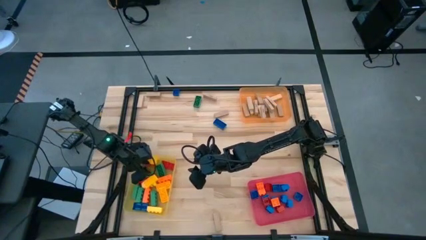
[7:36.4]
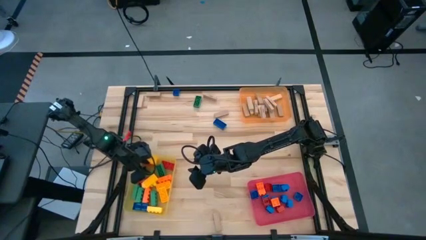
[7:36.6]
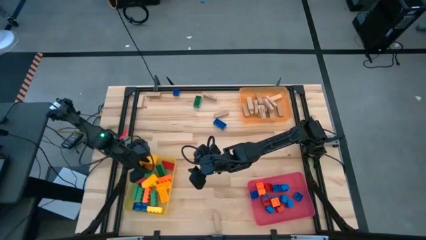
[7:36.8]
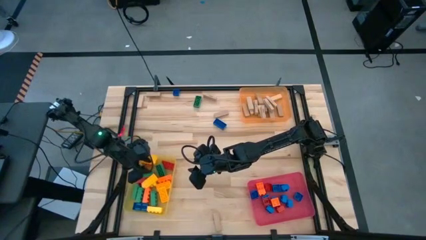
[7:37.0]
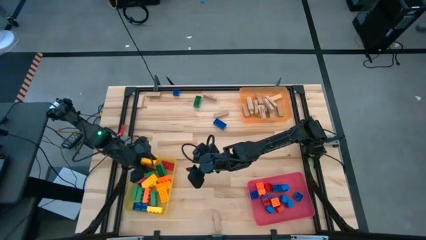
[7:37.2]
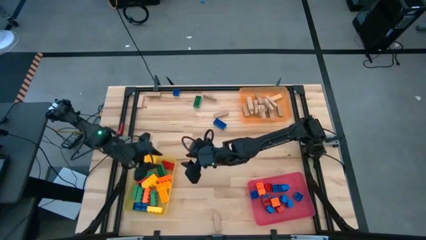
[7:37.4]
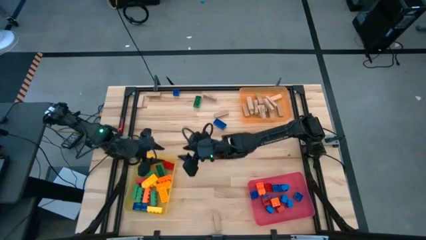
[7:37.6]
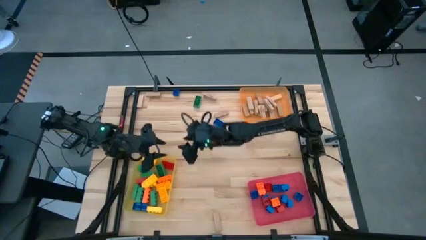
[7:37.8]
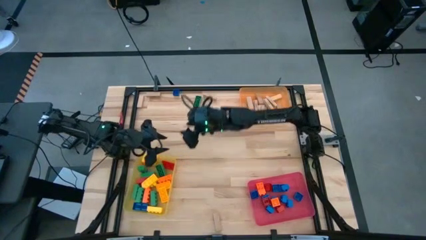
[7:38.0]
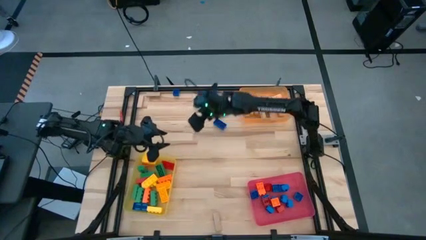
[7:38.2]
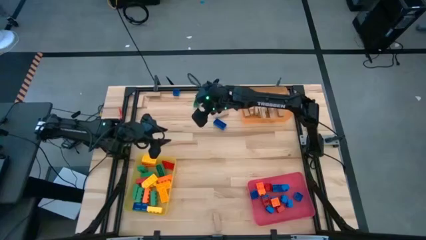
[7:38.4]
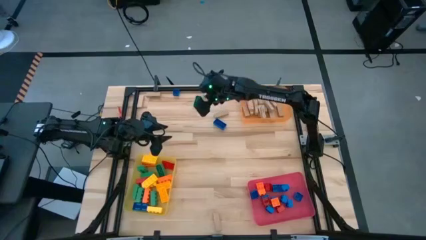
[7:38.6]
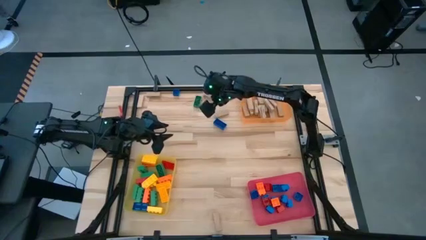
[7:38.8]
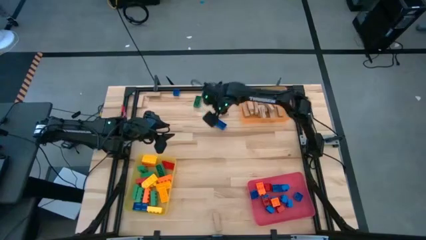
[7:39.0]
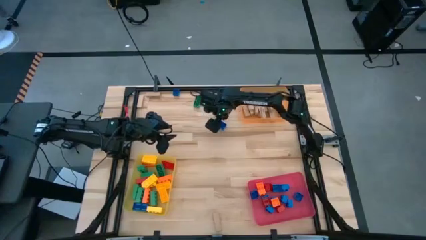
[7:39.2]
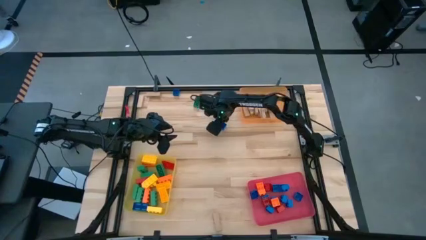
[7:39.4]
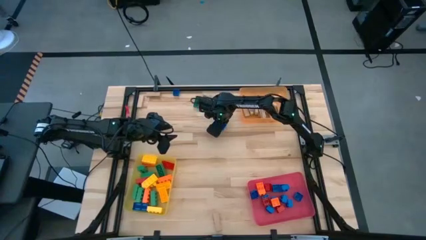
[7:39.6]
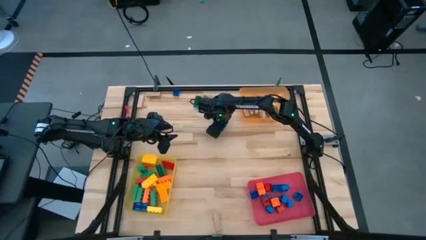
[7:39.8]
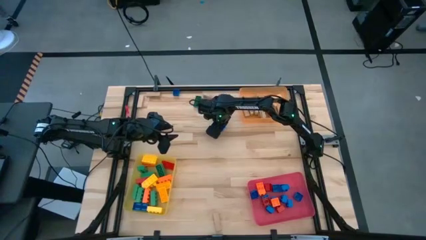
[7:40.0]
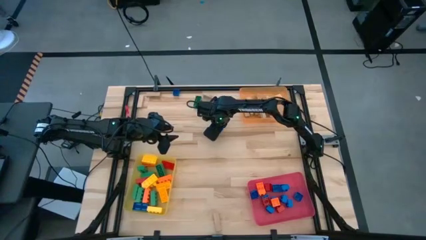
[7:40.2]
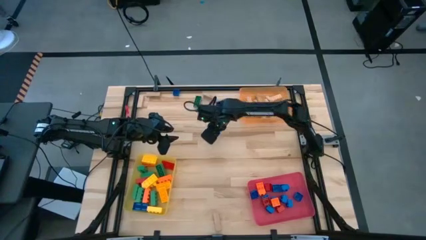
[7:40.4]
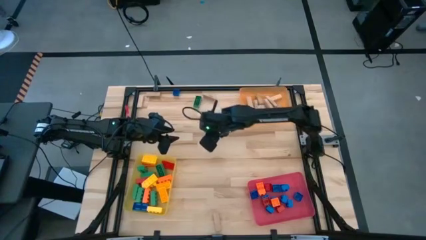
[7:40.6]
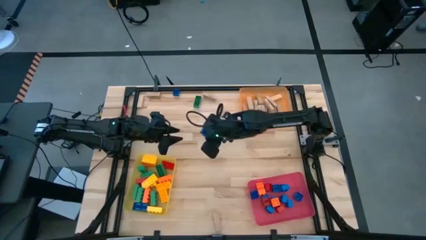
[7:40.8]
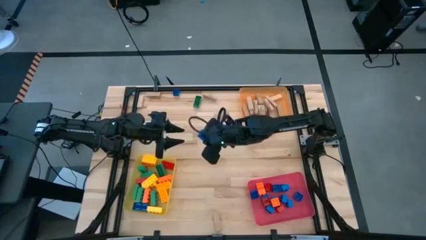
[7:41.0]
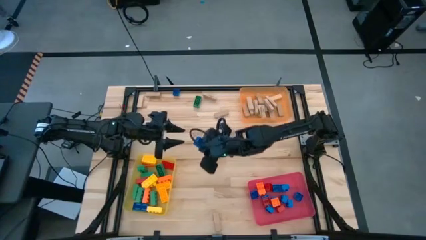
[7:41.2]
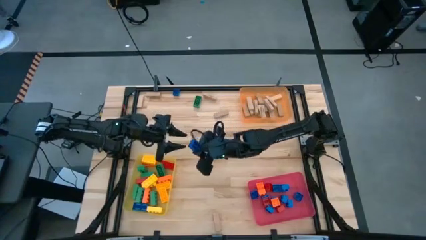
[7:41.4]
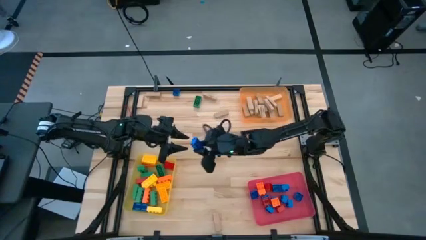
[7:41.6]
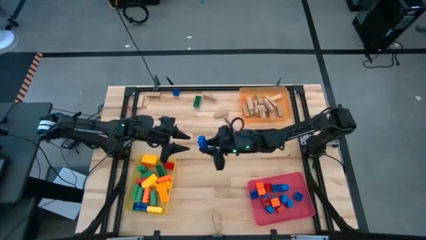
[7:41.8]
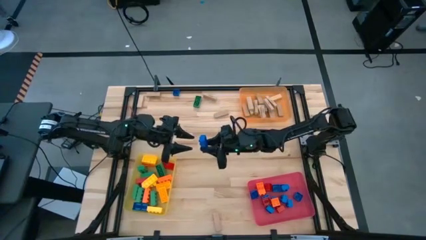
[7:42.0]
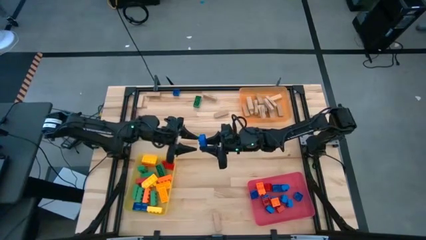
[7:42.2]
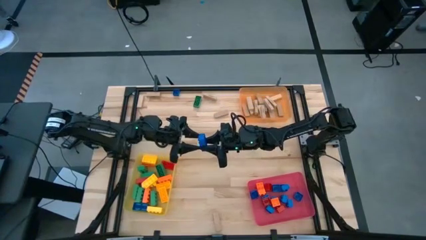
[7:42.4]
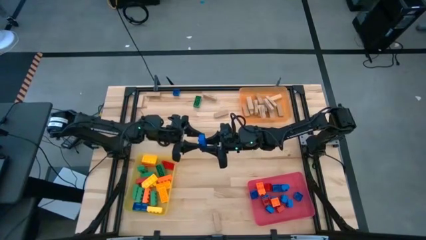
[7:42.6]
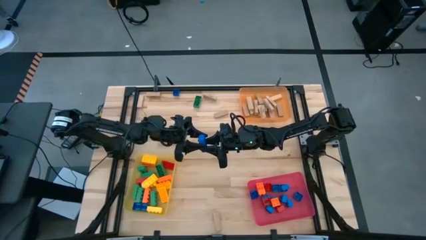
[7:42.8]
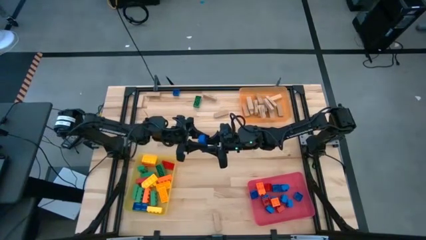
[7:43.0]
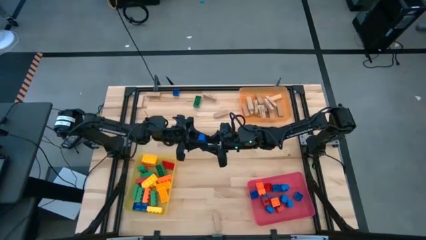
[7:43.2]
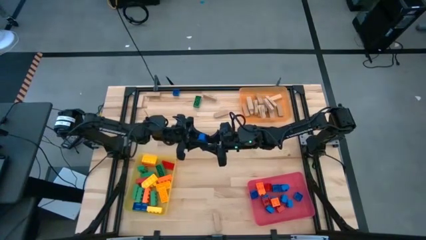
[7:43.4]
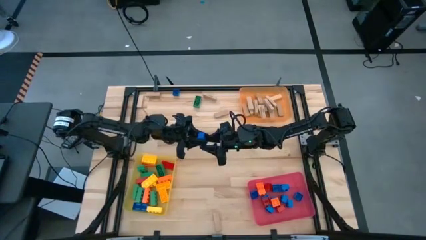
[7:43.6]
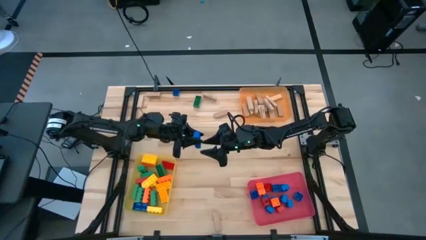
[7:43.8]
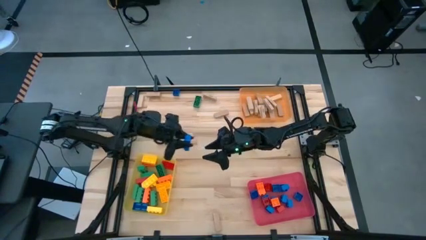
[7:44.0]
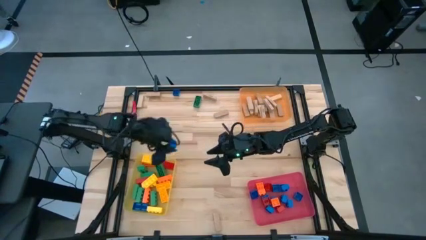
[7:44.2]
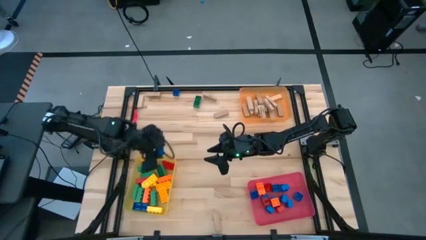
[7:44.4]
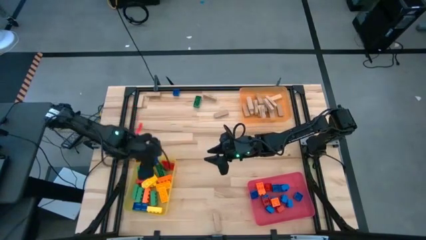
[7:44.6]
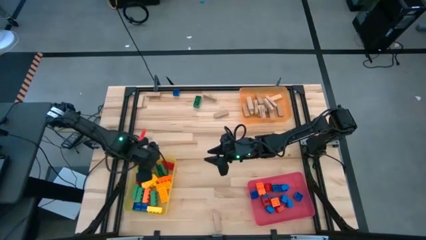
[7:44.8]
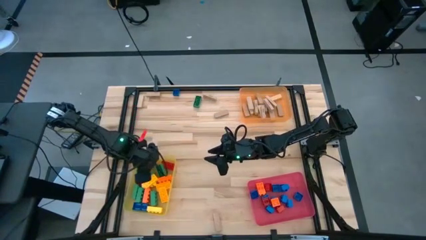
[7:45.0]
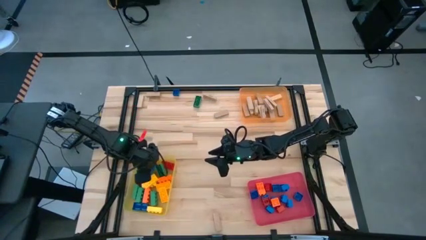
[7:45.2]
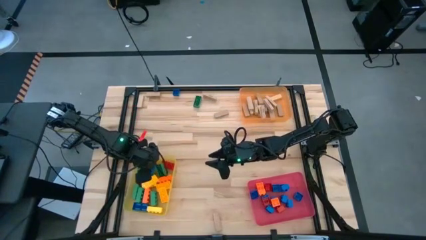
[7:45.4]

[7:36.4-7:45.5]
Task: Sort blocks by size
Put the large blue game piece into the yellow bin

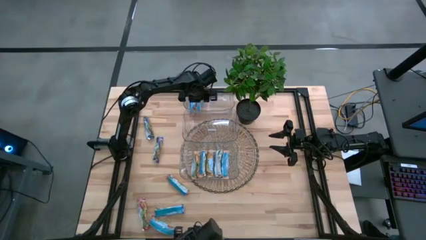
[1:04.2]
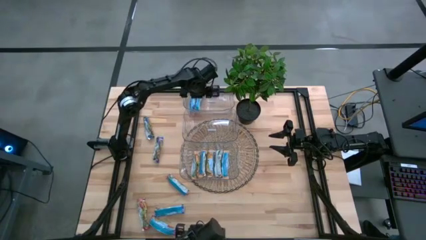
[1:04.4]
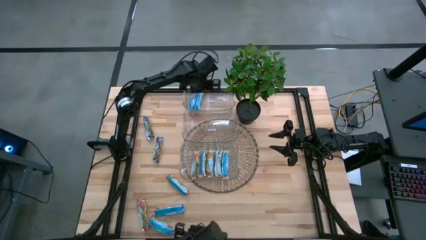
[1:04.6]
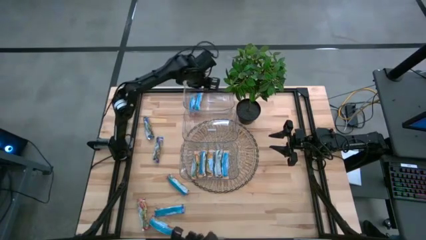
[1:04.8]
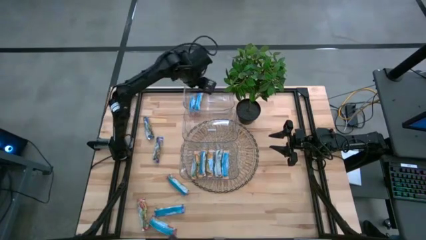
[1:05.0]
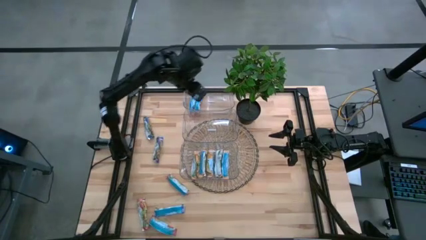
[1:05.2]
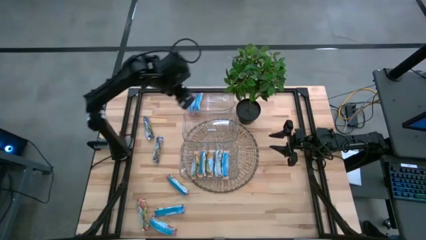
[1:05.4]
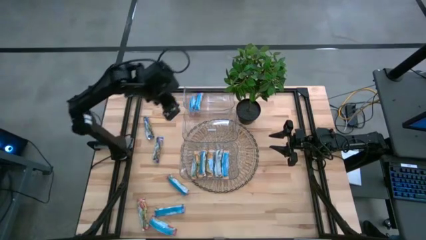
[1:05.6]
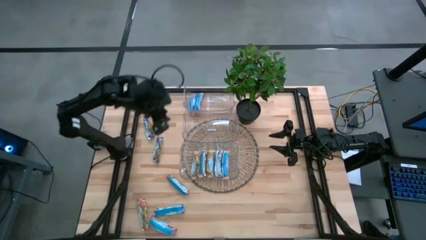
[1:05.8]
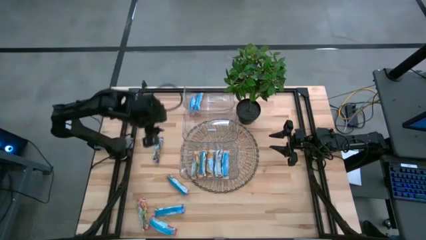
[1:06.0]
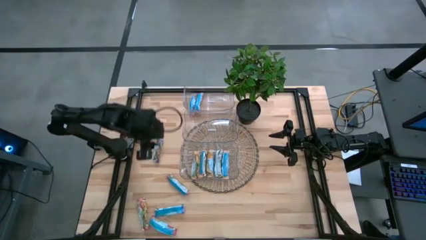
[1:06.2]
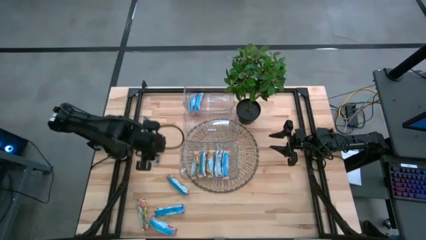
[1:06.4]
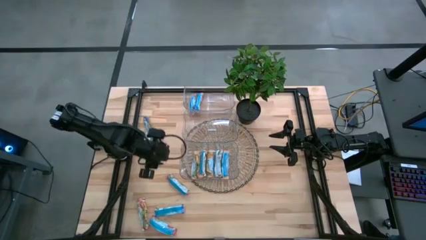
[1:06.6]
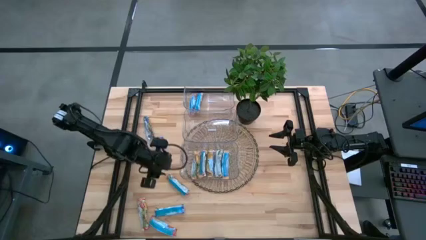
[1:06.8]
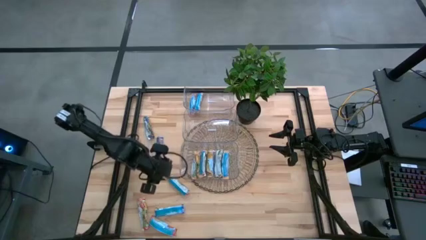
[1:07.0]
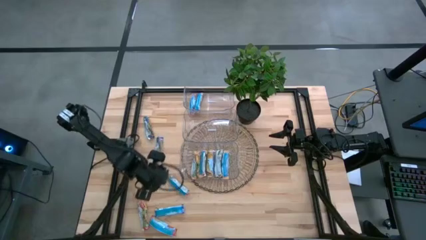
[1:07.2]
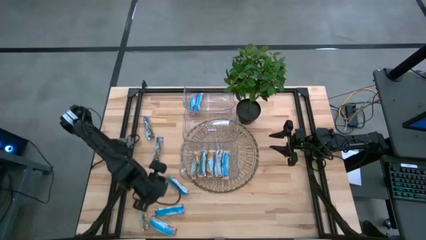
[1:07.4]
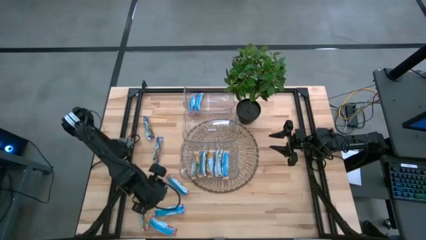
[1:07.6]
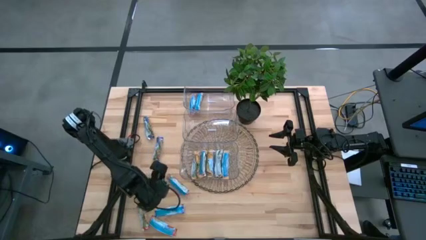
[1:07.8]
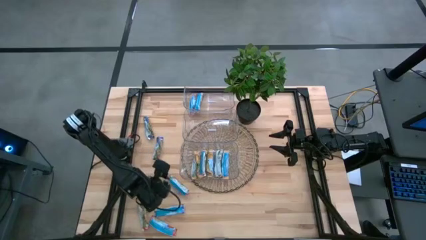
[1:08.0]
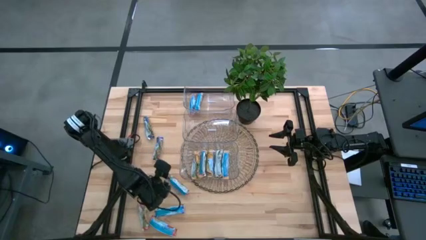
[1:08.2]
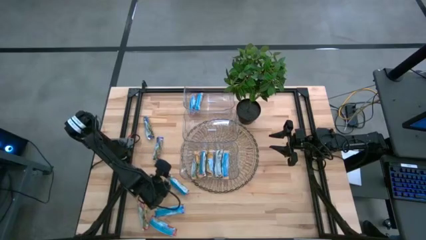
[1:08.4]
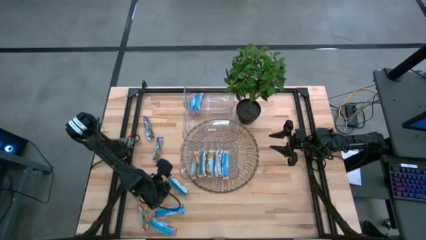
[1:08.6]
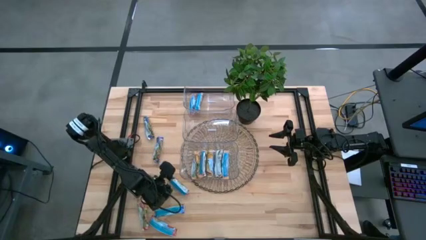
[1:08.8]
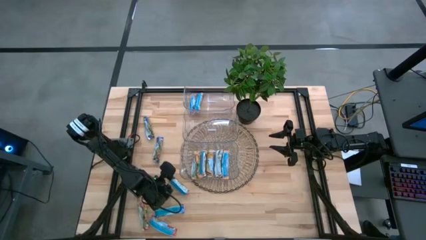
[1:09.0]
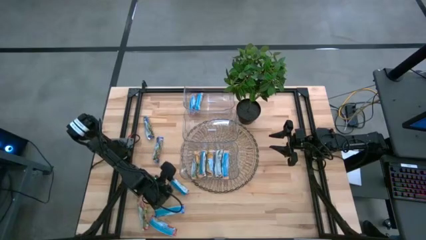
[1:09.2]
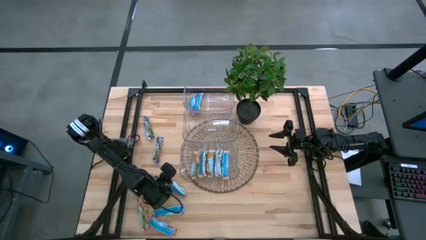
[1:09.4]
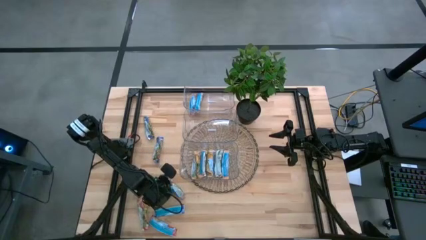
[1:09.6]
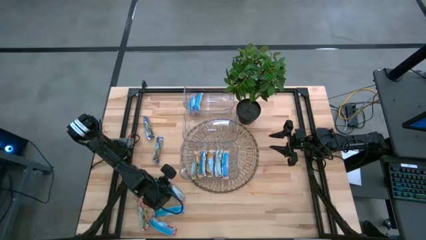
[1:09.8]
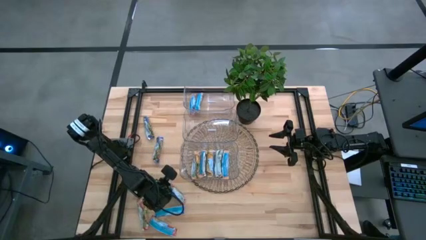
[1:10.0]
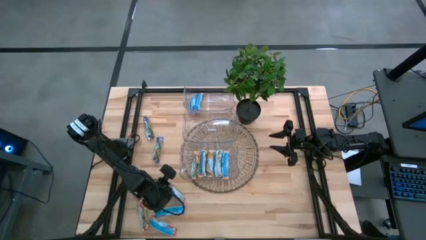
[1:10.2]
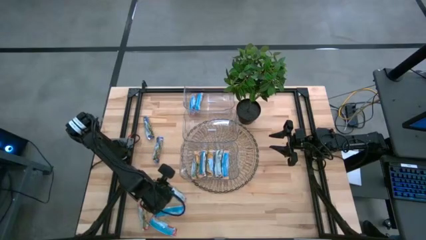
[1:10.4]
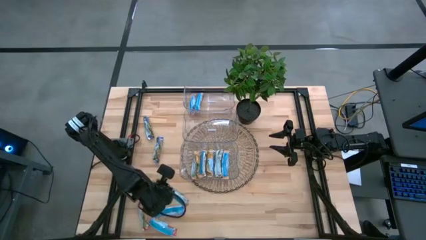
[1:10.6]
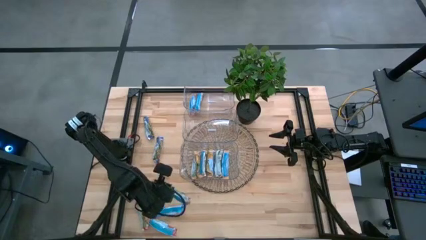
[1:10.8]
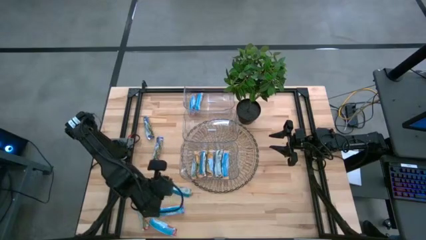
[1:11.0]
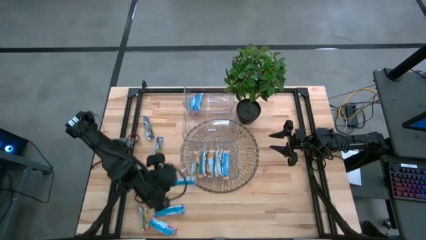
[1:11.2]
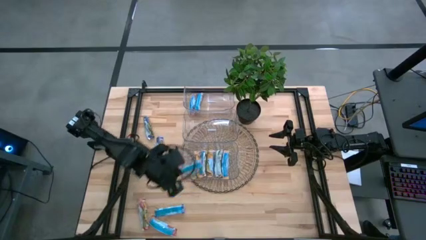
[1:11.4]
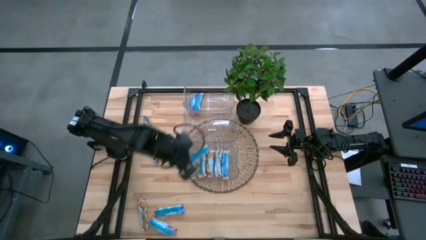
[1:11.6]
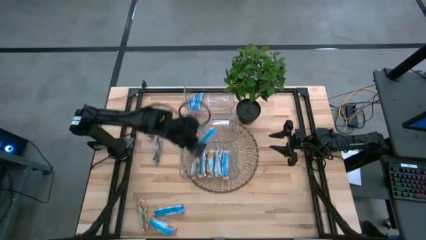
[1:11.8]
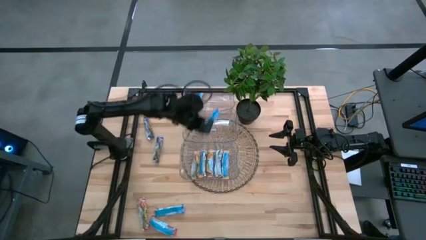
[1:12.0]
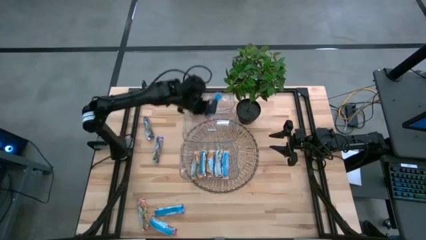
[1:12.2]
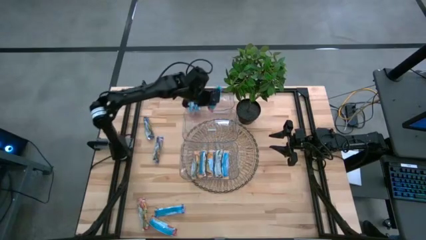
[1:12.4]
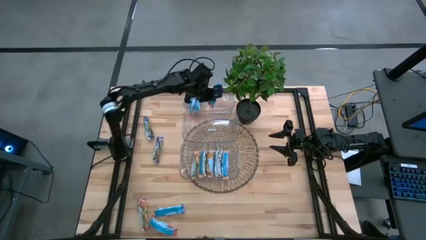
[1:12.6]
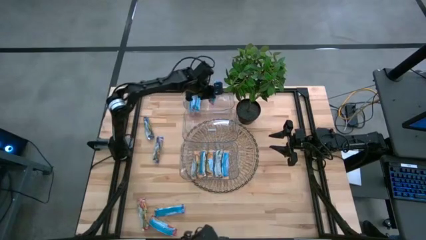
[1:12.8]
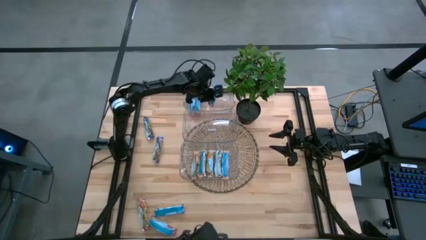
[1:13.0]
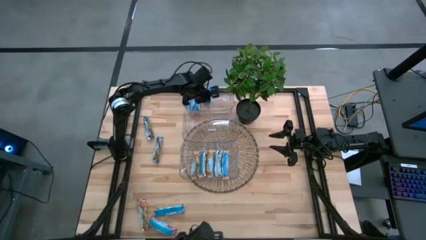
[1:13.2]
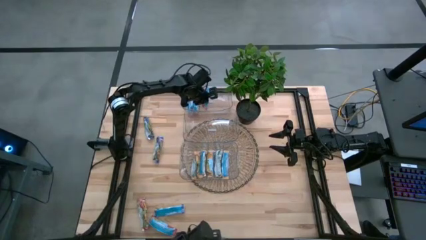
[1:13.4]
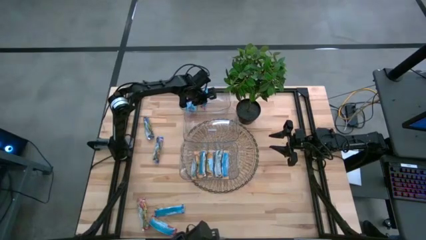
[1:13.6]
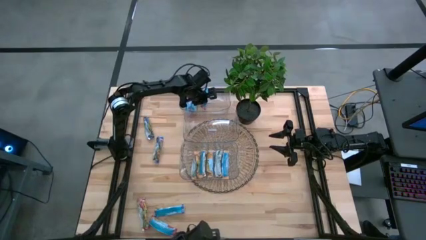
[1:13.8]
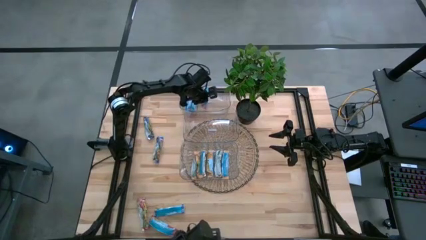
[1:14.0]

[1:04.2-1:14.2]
Task: Pick and place Granola Bars by type
Put the red granola bar into the top transparent bin
